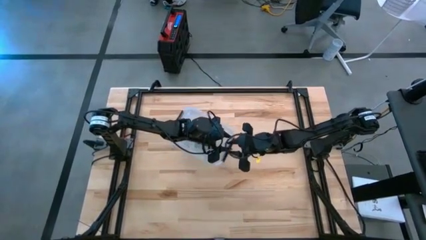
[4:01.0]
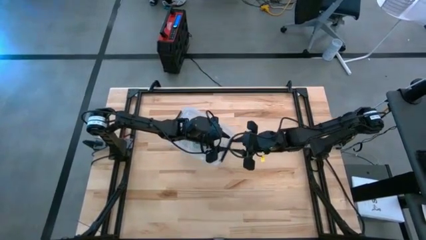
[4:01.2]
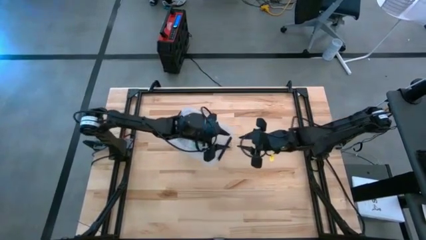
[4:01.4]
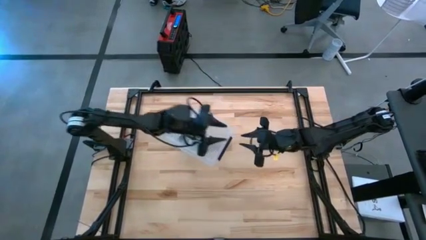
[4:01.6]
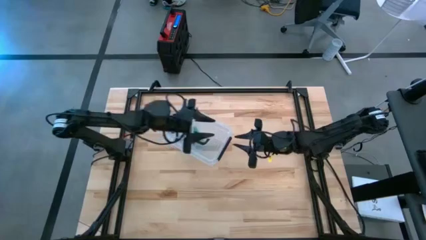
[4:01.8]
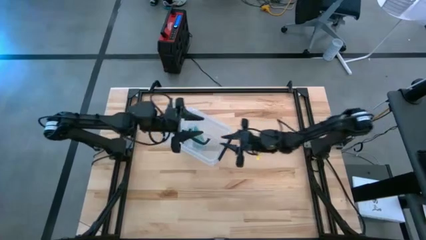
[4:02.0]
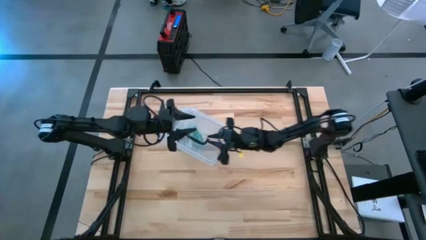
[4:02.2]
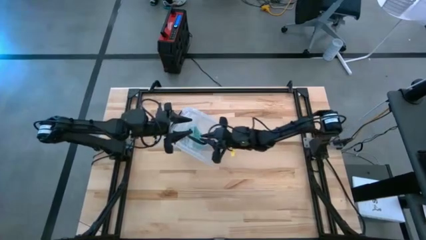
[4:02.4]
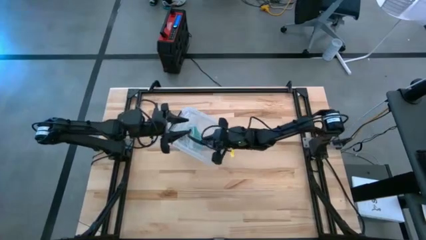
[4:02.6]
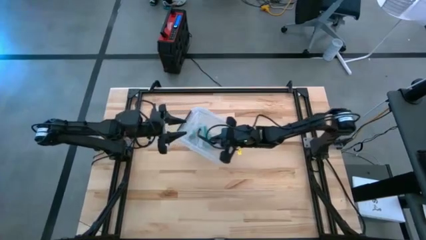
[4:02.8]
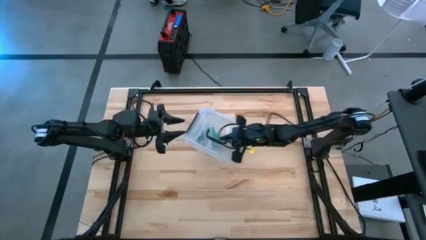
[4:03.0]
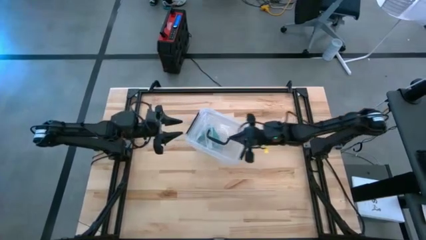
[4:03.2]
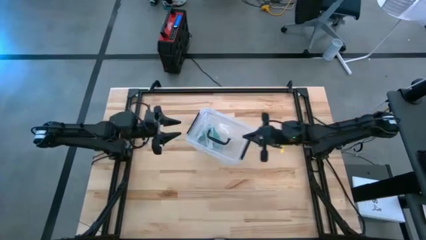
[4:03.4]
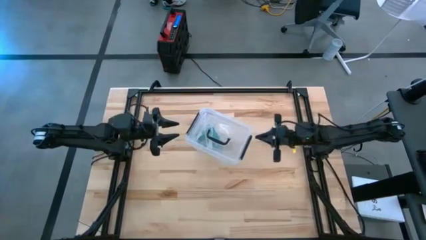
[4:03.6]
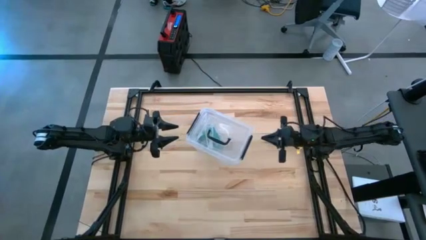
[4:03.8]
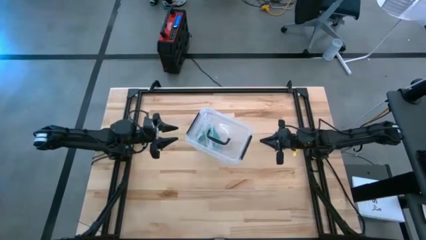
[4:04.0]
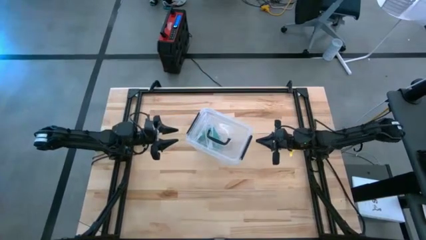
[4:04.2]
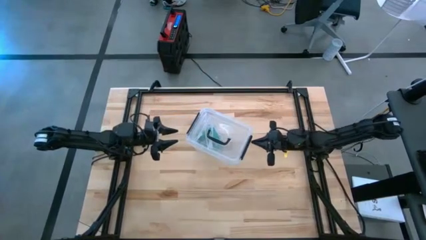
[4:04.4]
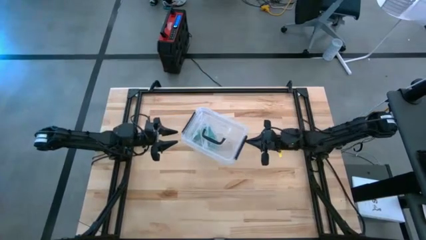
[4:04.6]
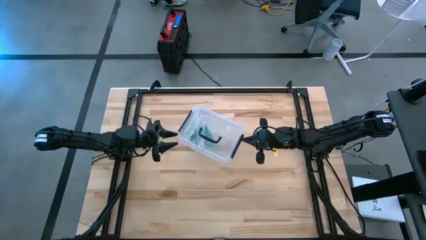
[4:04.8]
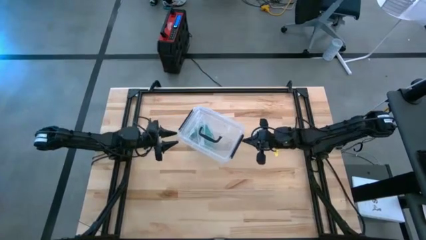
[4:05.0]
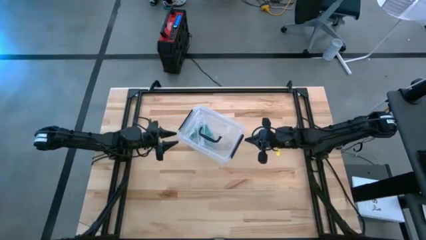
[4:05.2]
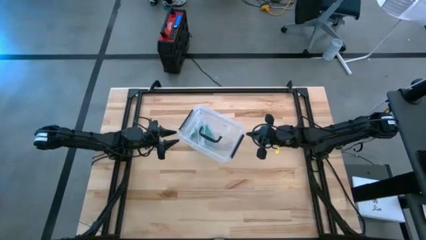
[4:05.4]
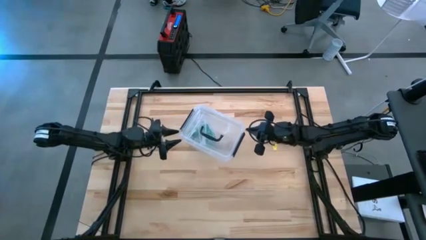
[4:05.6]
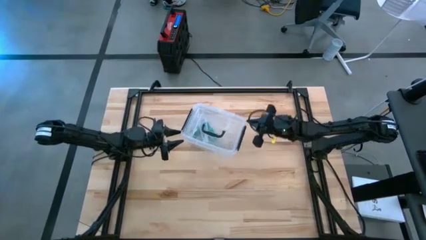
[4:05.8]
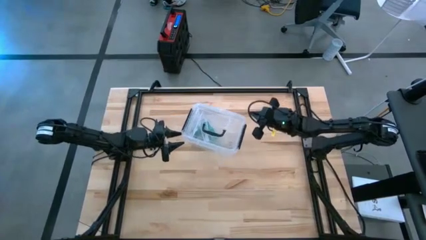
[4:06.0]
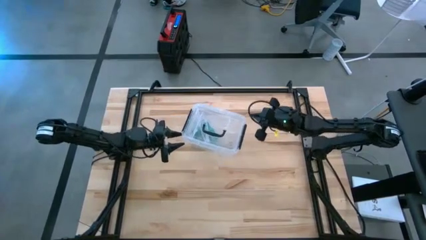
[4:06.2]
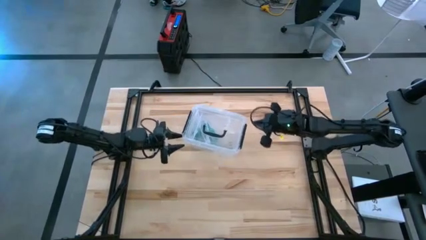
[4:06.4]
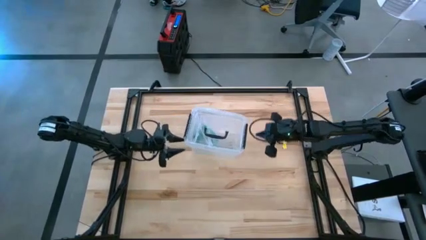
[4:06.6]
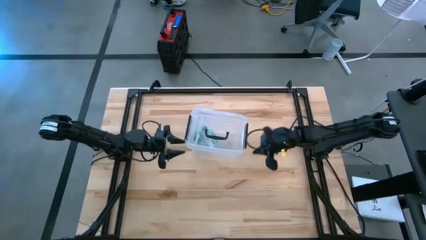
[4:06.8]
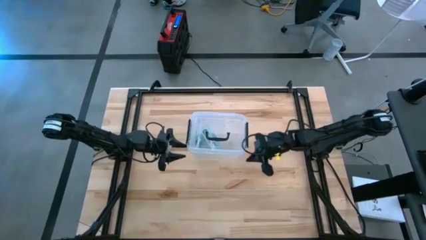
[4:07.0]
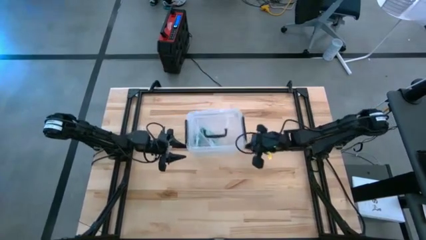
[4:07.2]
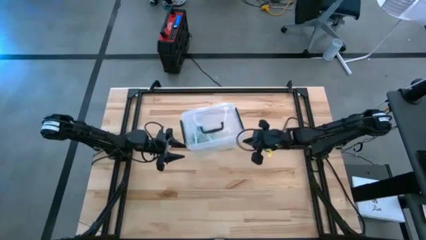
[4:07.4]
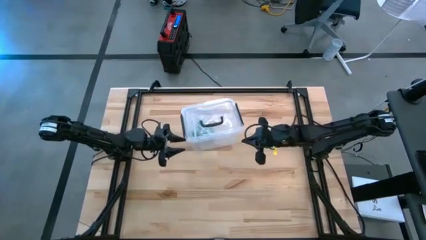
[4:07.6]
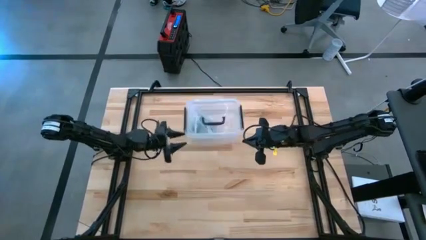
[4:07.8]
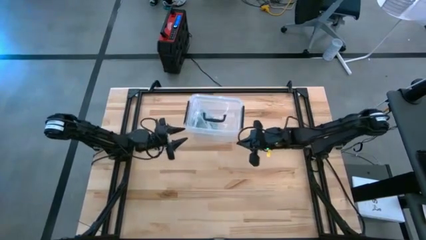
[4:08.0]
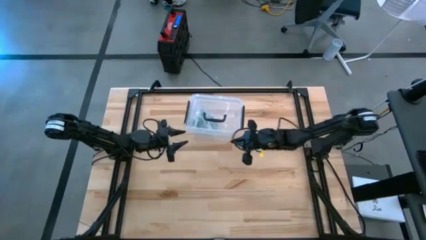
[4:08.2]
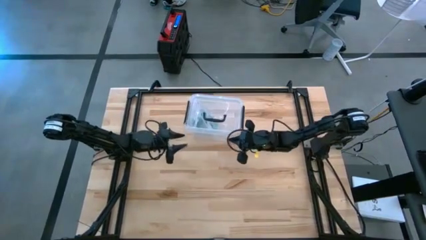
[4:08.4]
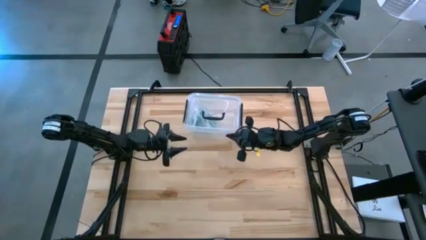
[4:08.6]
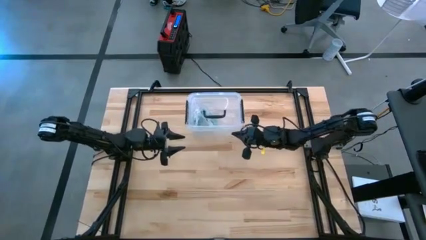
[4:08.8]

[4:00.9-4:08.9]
Task: Roll bandage
Move the transparent bin to the top center of the table

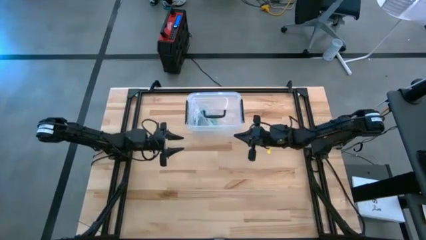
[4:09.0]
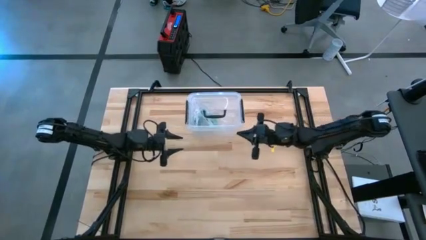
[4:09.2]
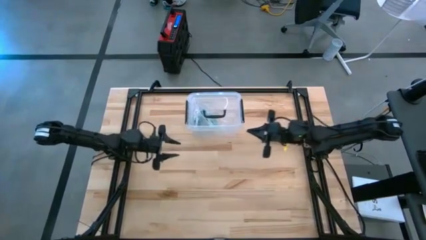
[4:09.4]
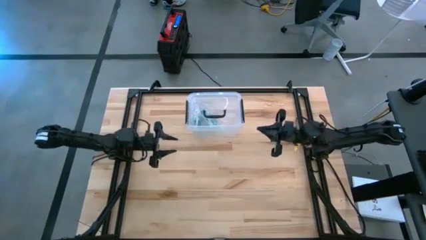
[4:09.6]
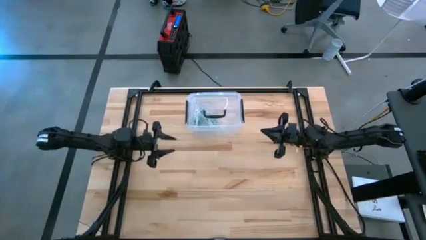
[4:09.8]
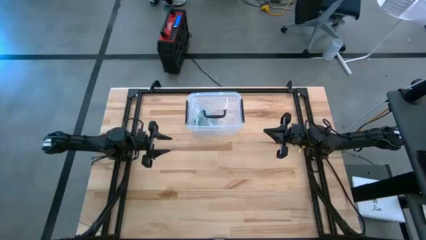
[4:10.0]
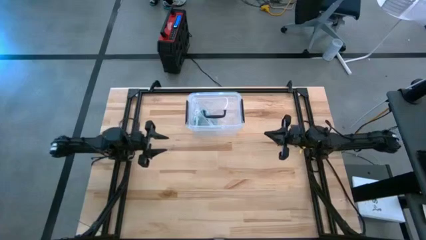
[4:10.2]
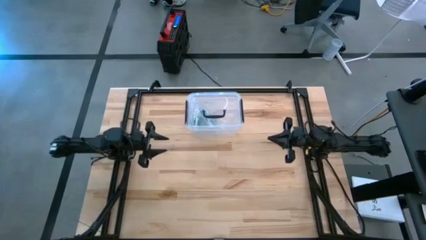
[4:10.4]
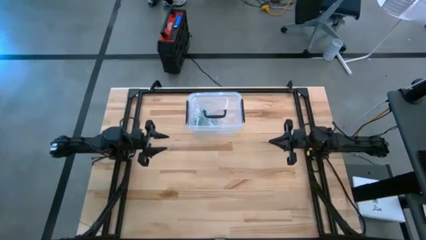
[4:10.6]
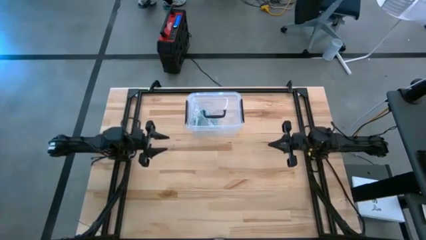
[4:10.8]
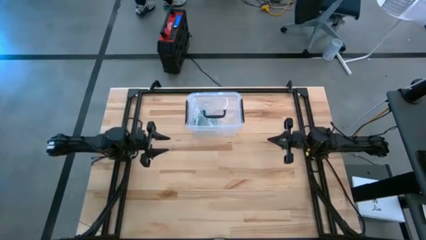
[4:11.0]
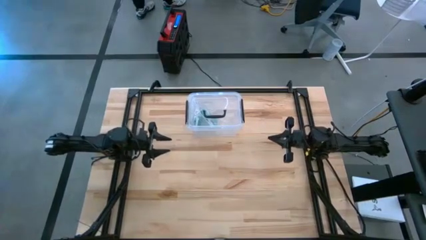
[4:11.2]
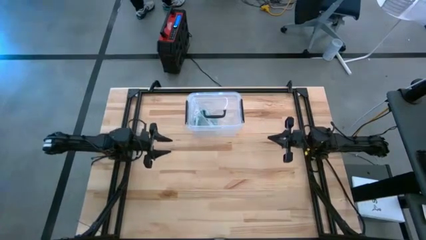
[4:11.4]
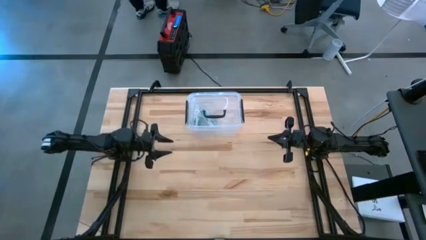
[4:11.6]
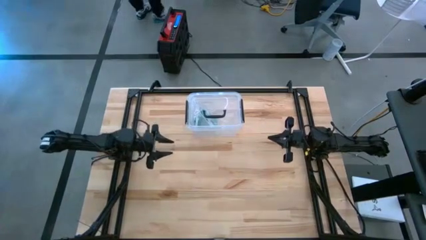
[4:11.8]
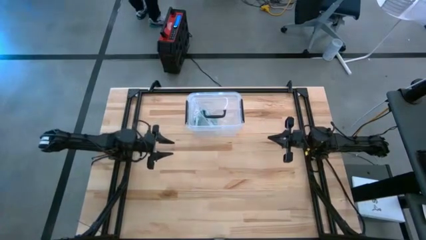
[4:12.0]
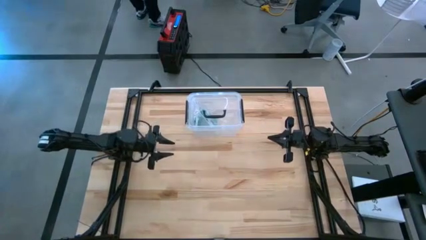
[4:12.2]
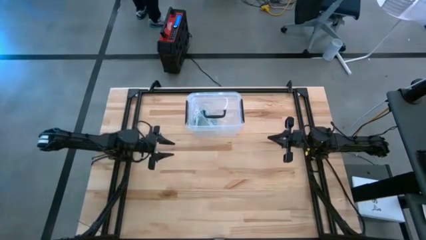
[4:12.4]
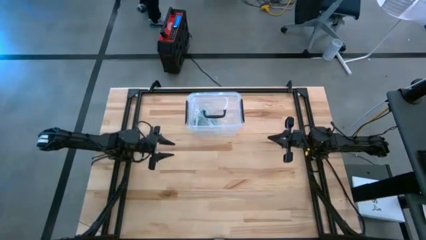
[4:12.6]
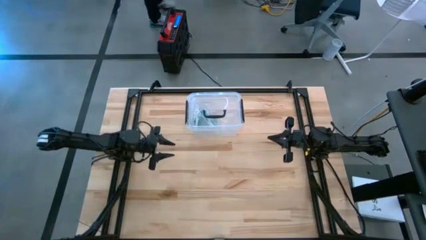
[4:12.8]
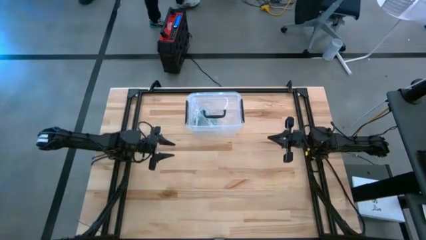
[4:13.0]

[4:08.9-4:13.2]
Return to Home Position

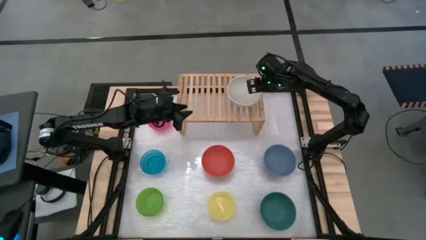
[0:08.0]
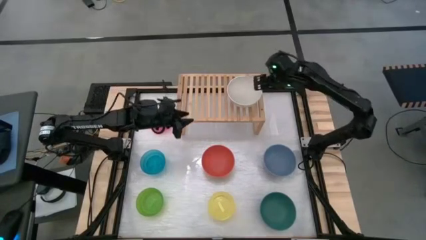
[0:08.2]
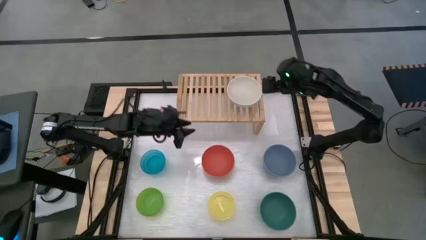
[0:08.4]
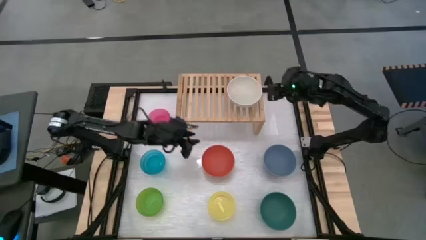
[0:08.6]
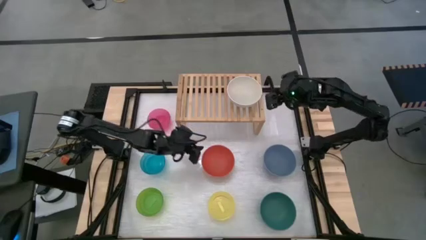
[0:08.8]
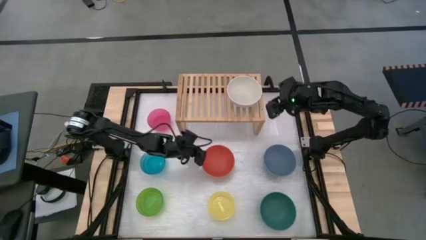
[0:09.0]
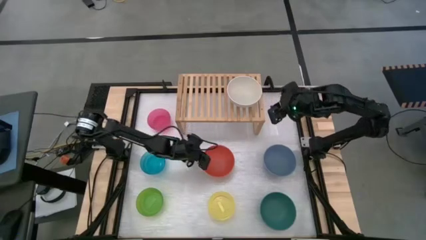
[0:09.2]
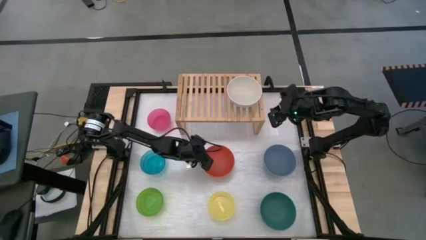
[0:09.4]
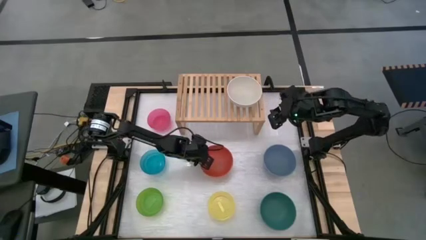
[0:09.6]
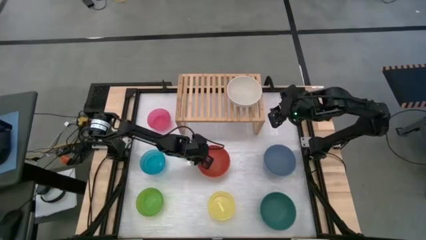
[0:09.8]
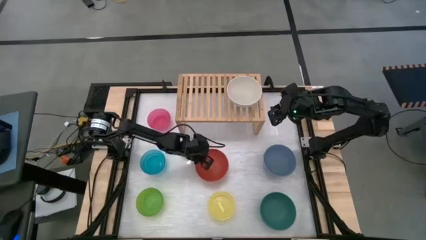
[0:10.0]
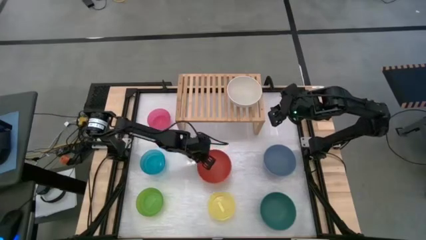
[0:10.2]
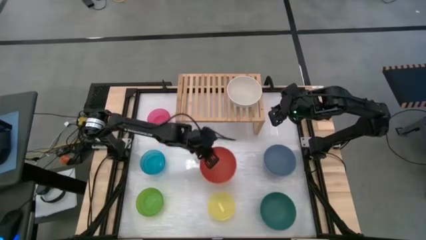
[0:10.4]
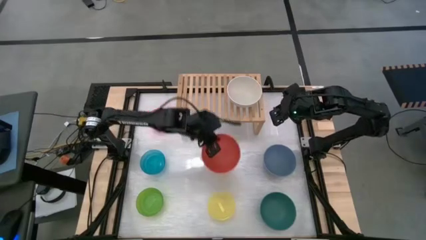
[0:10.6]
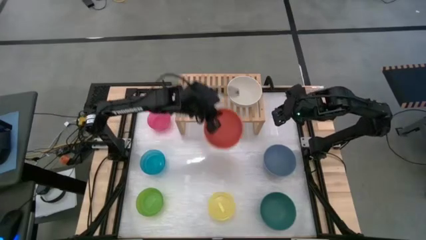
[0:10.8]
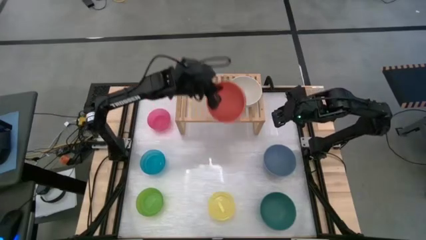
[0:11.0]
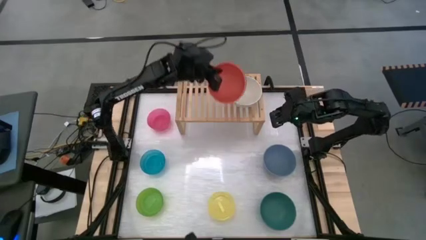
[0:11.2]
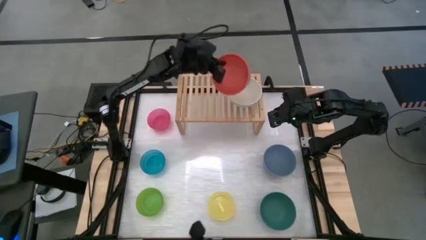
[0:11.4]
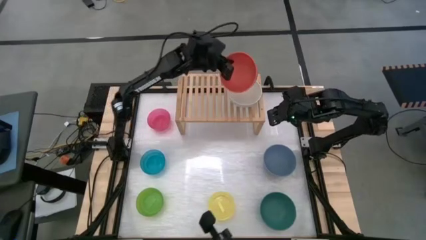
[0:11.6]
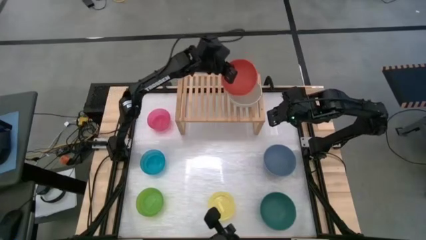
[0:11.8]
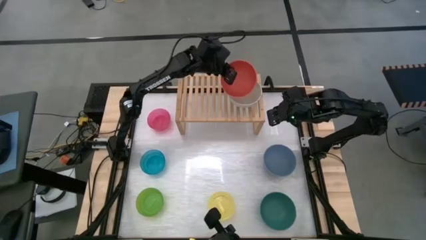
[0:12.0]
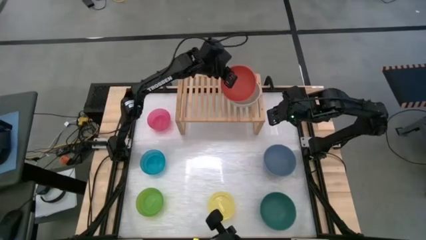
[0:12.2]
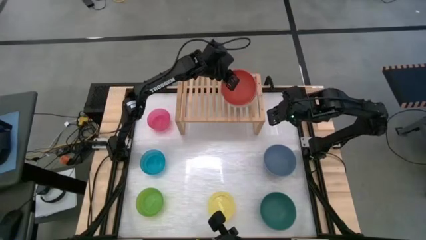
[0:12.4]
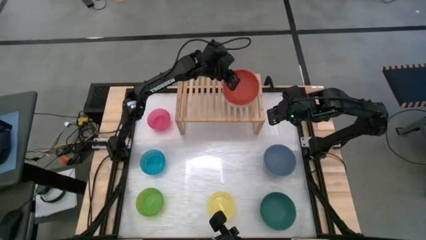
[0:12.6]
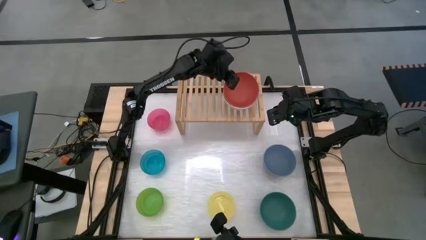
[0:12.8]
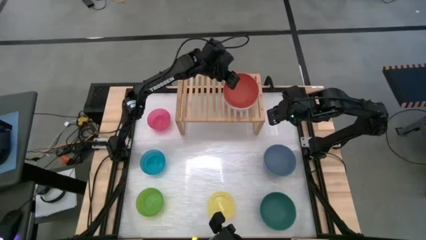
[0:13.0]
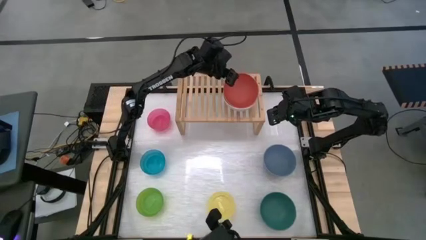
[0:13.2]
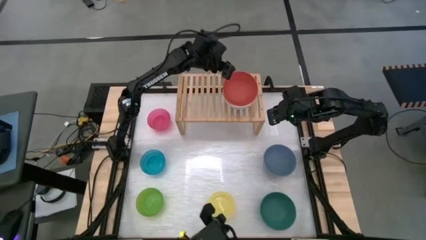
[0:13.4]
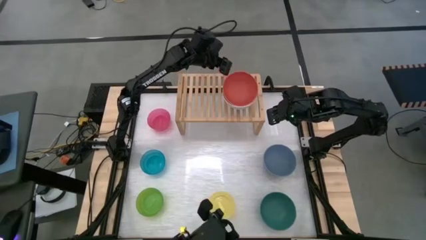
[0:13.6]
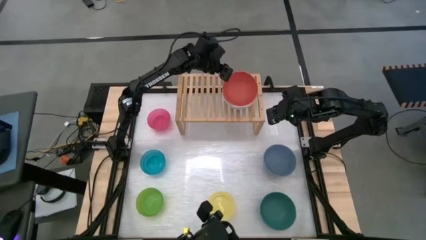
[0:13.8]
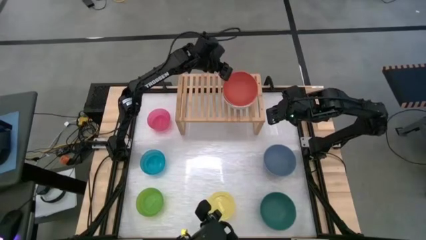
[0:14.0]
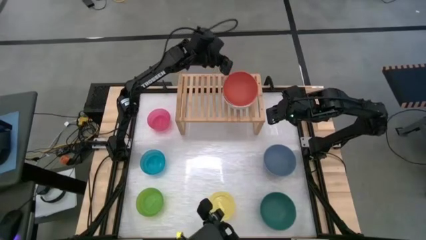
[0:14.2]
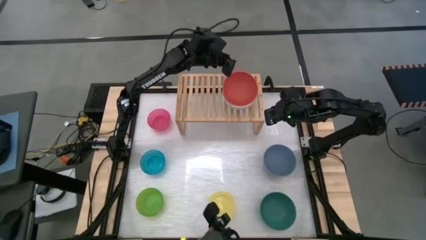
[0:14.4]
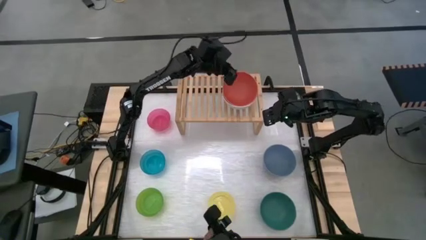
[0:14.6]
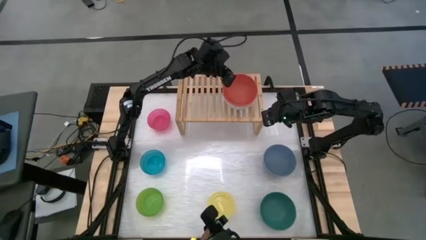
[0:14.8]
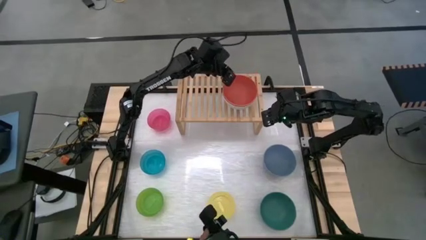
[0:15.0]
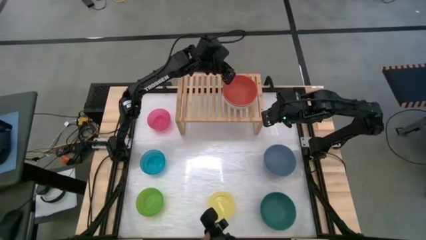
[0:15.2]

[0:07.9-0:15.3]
Task: Place and stack bowls onto a shelf
Stack the large orange bowl on the white bowl on the shelf
